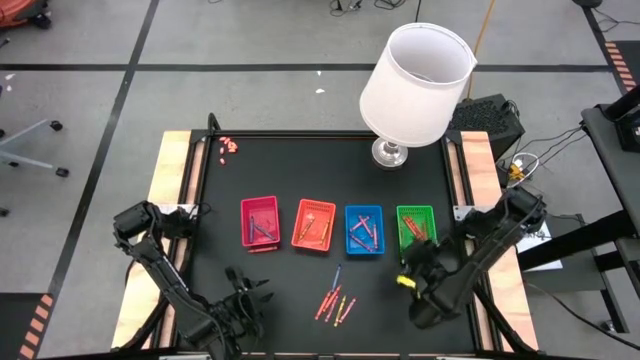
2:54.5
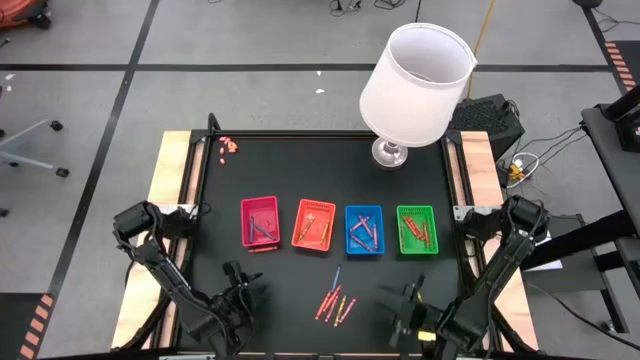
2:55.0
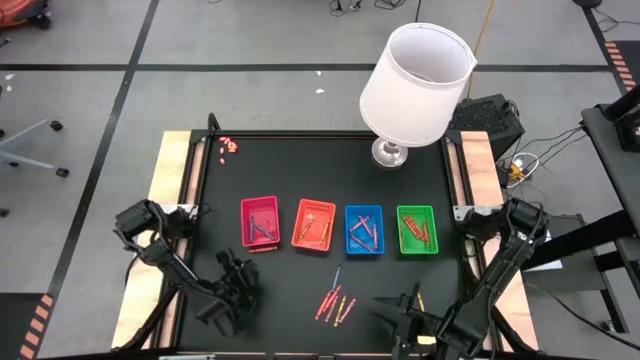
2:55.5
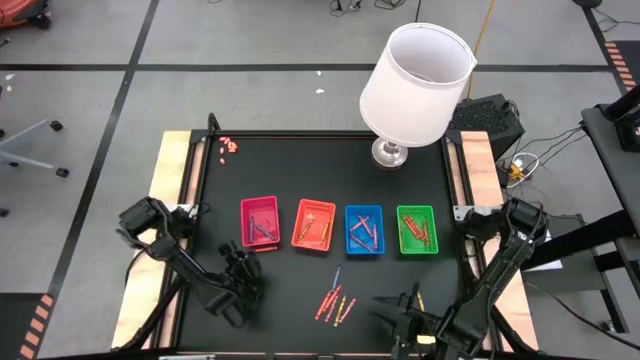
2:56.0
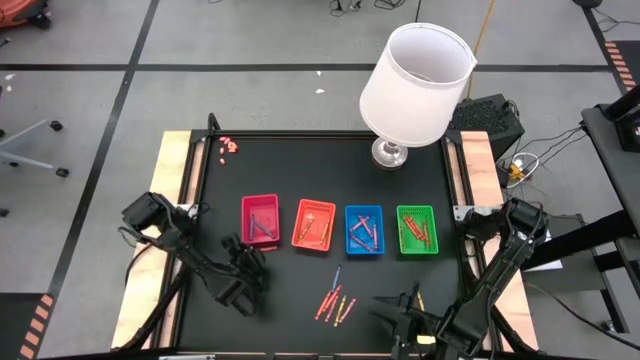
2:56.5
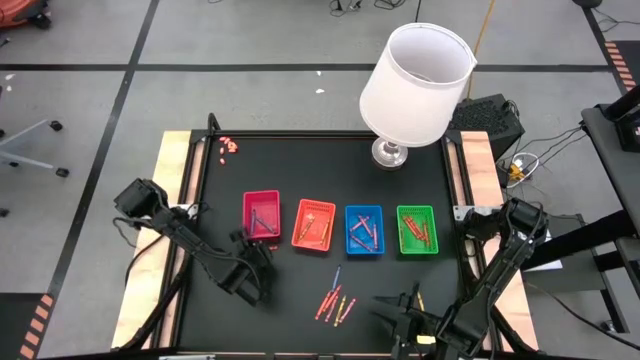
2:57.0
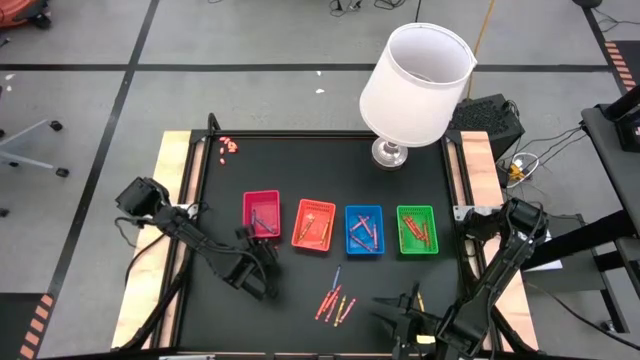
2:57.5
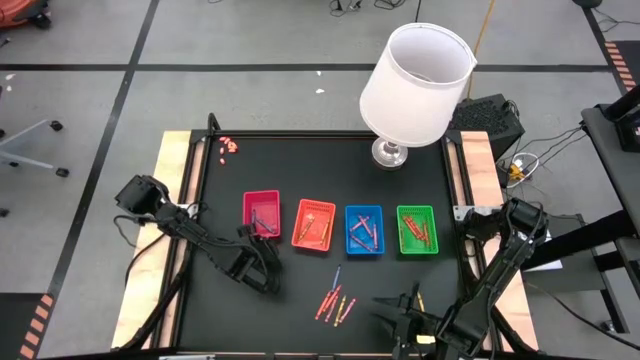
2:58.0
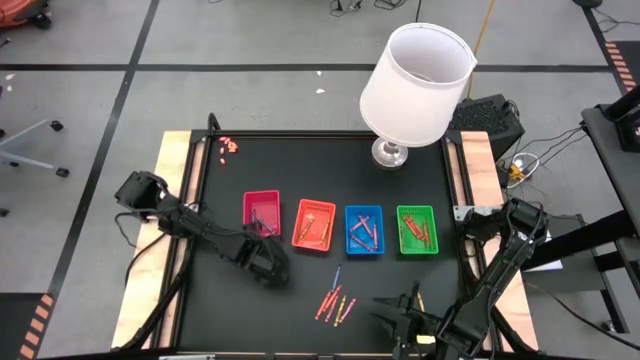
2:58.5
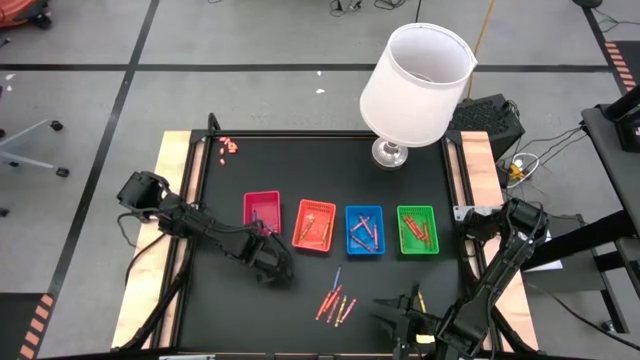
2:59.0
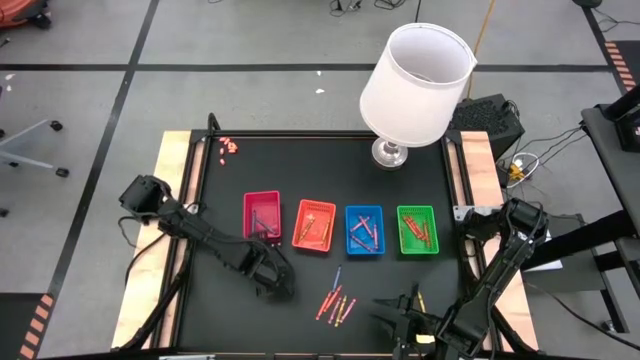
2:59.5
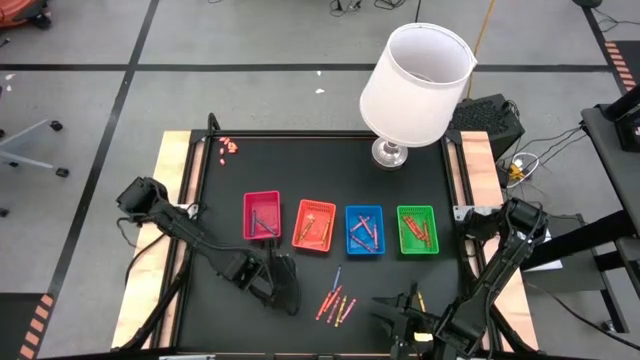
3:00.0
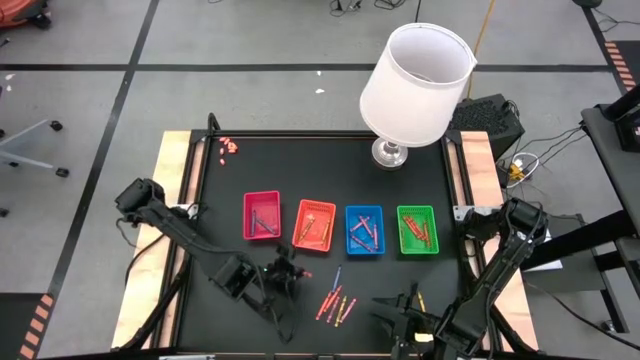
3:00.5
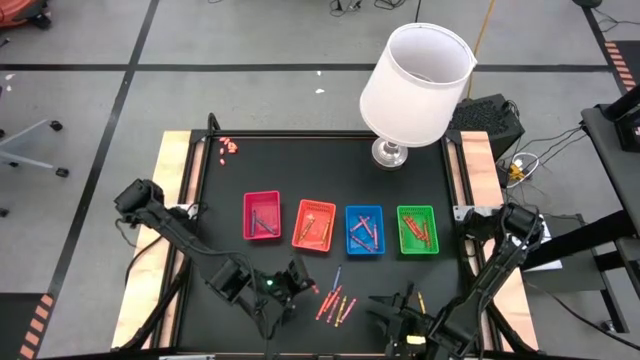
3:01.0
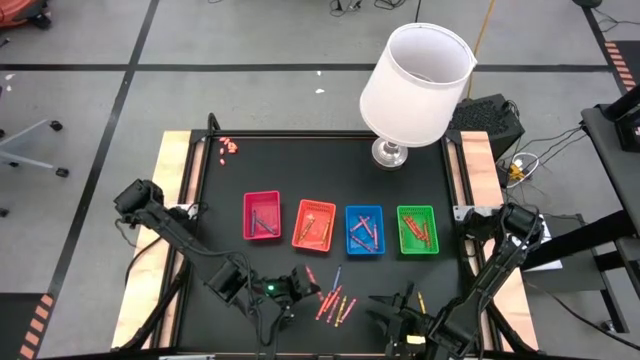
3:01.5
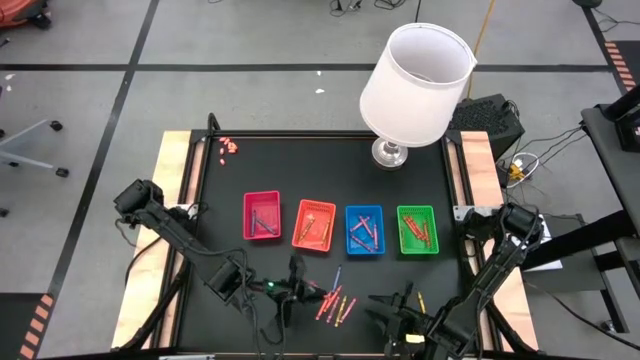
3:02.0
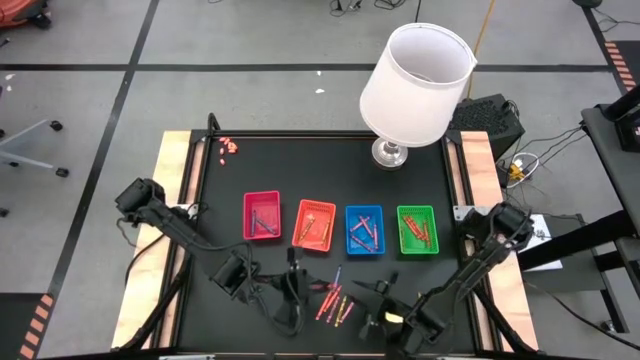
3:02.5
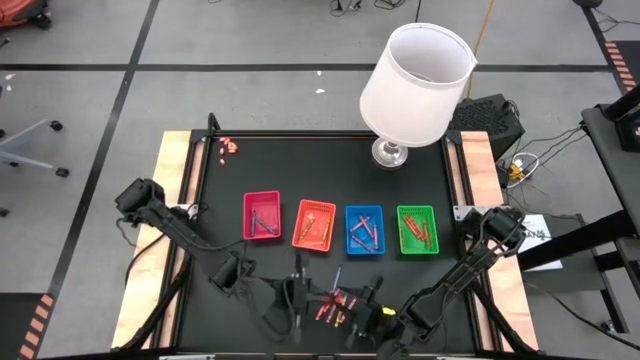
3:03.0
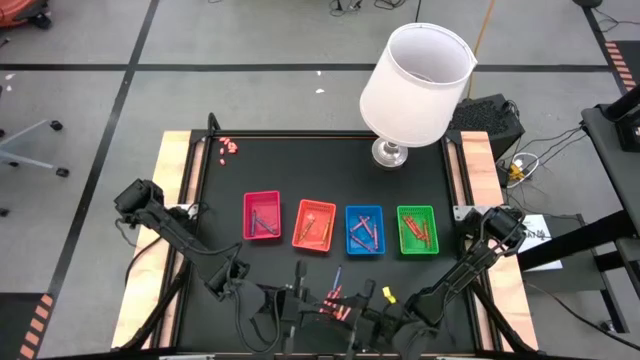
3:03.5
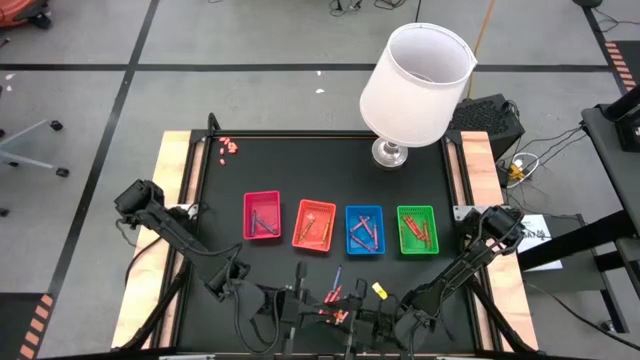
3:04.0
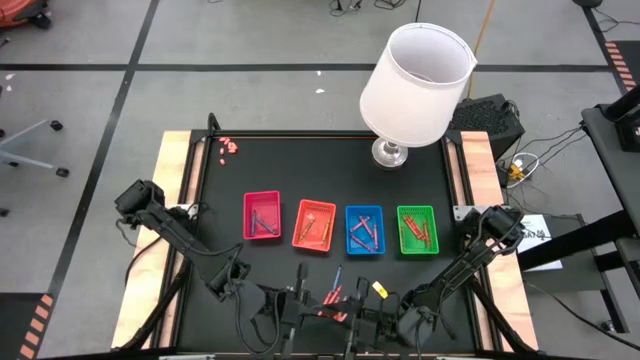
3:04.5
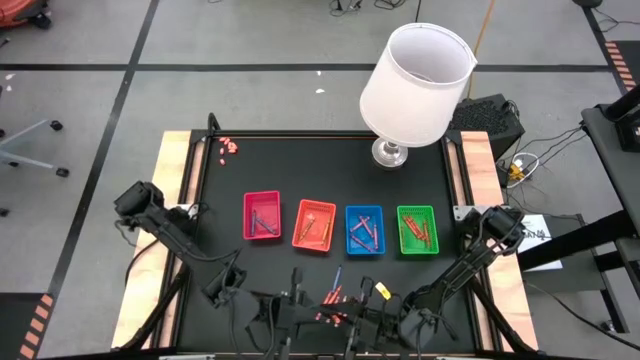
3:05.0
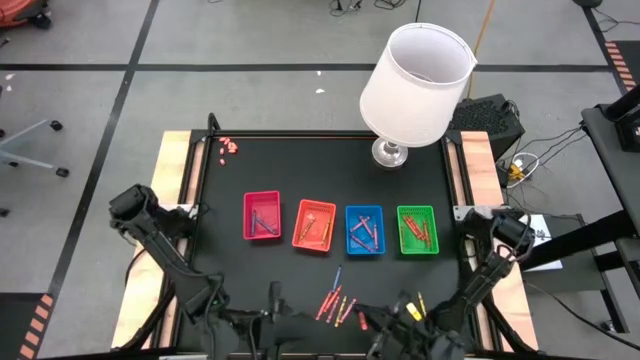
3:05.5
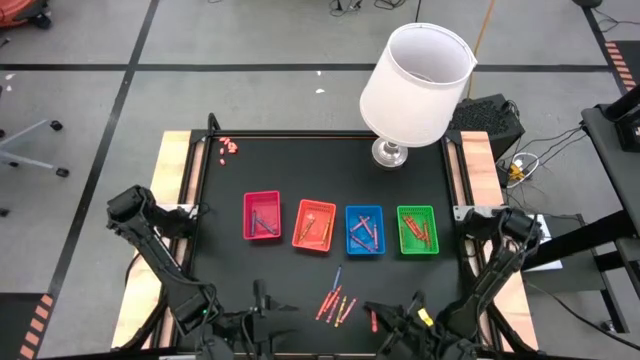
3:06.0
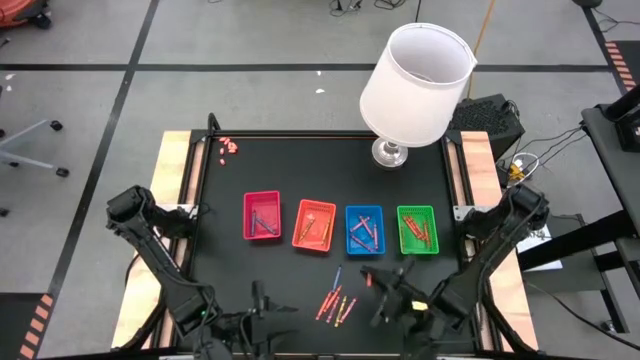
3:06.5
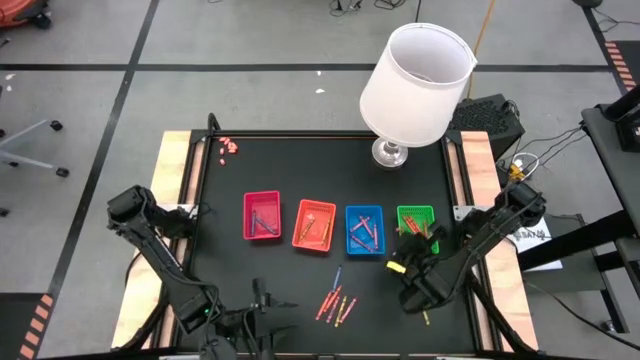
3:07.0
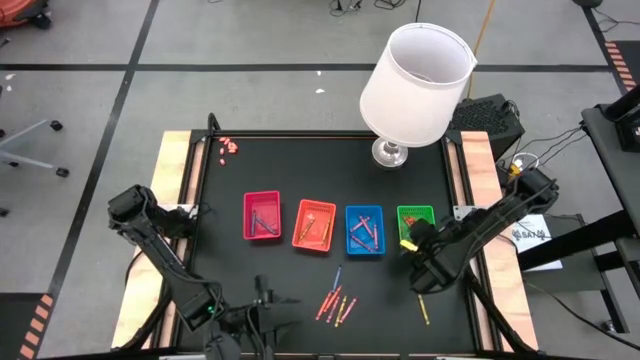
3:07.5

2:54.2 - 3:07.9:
Task: Sort crayons
Put the orange crayon into the green bin

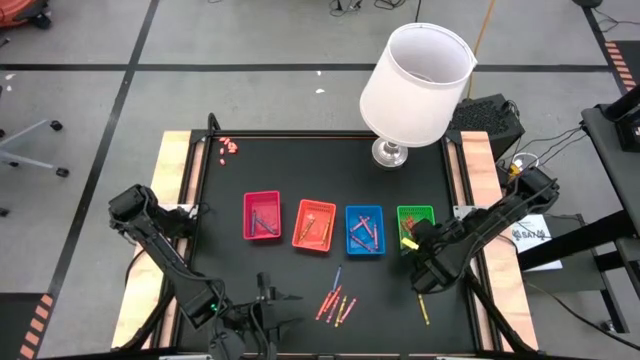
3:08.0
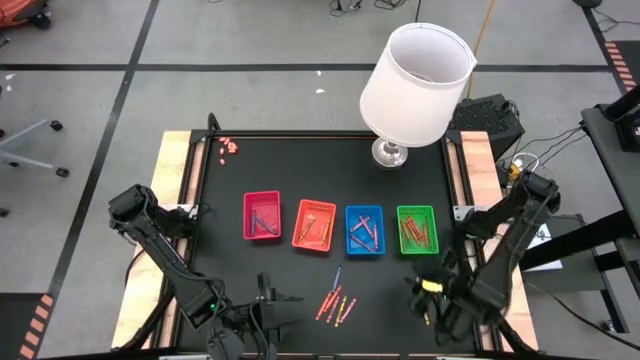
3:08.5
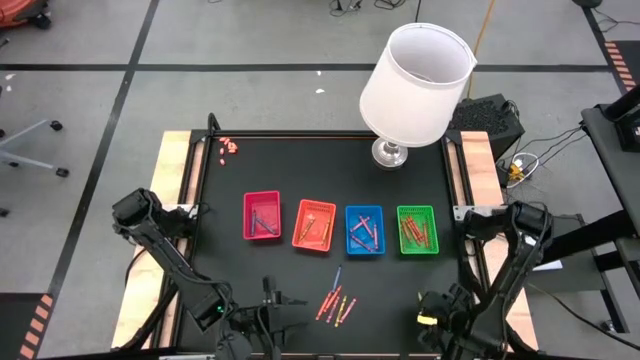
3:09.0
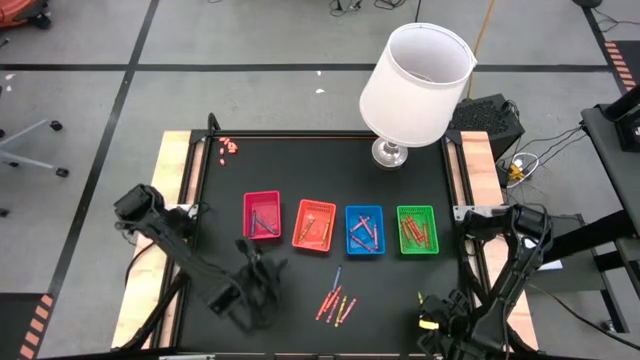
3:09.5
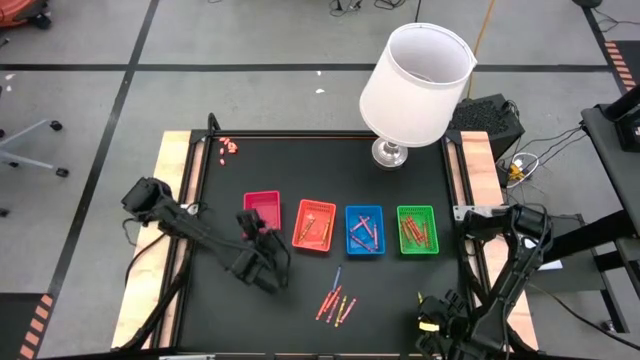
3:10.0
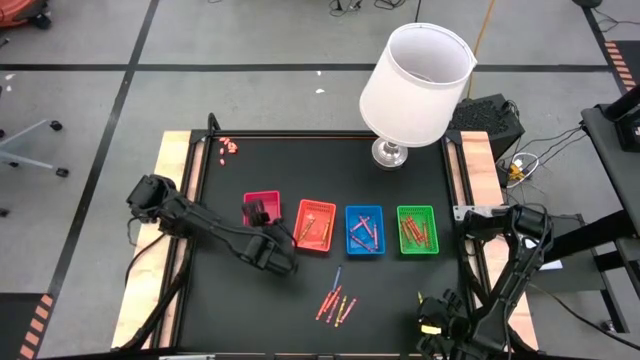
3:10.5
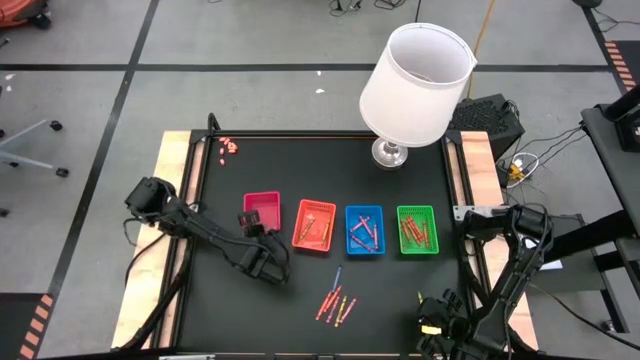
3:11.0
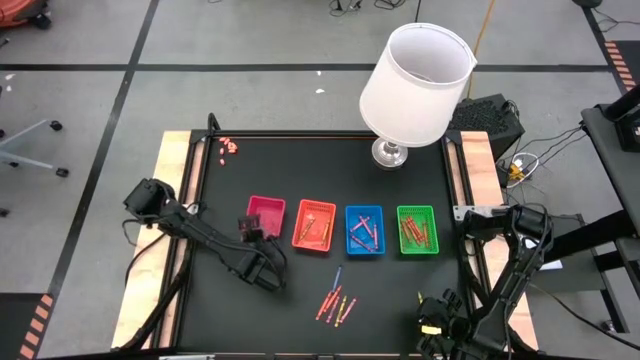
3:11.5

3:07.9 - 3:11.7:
Adjust the red bin

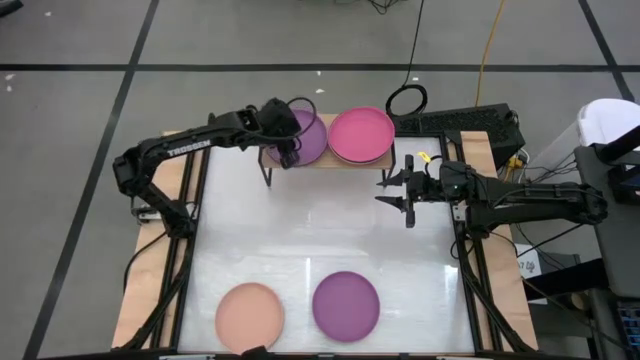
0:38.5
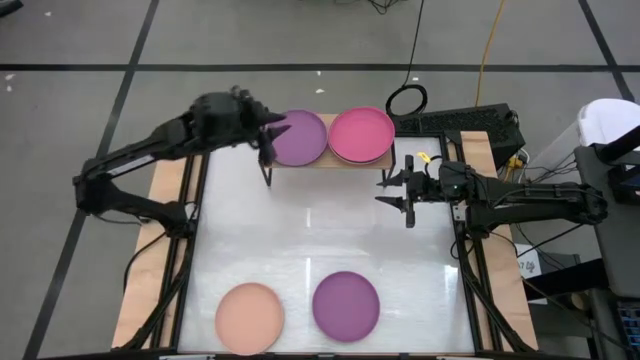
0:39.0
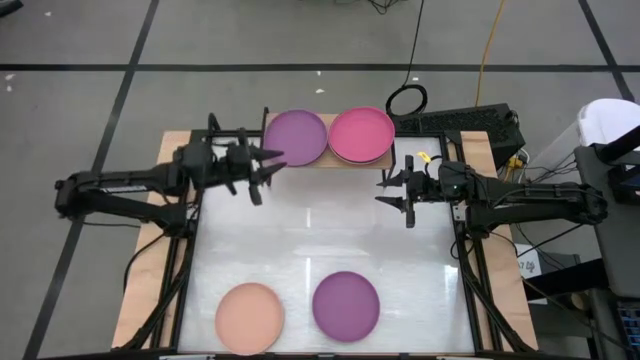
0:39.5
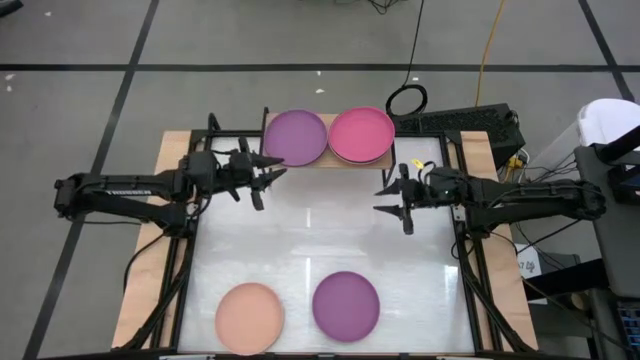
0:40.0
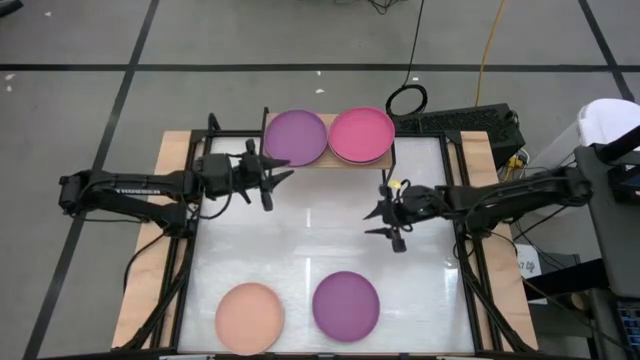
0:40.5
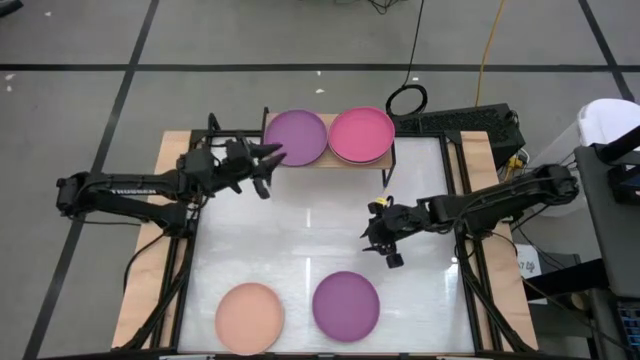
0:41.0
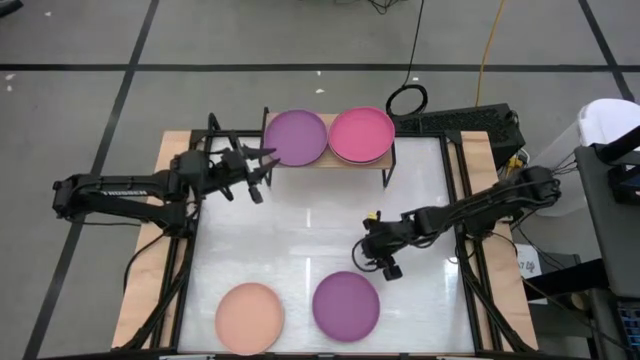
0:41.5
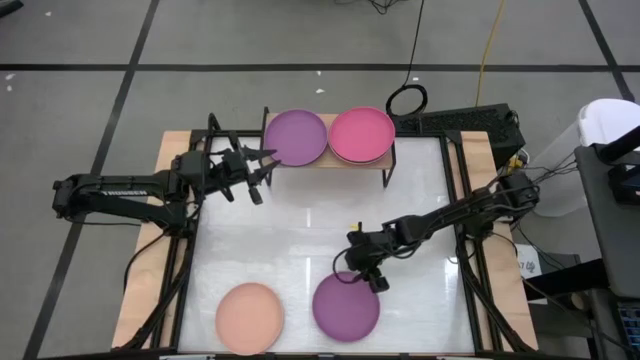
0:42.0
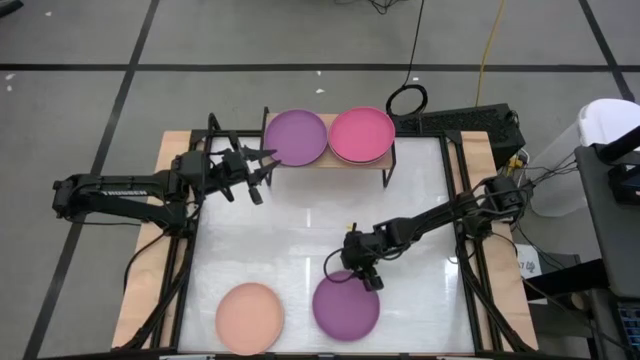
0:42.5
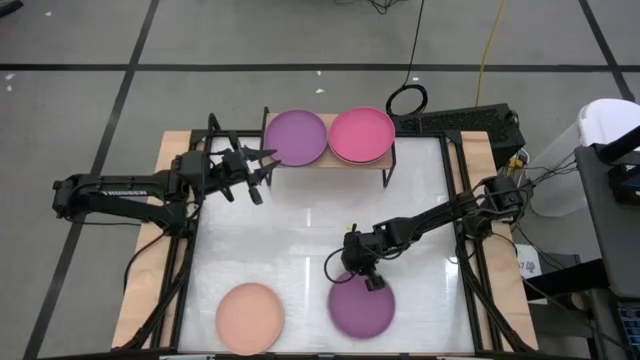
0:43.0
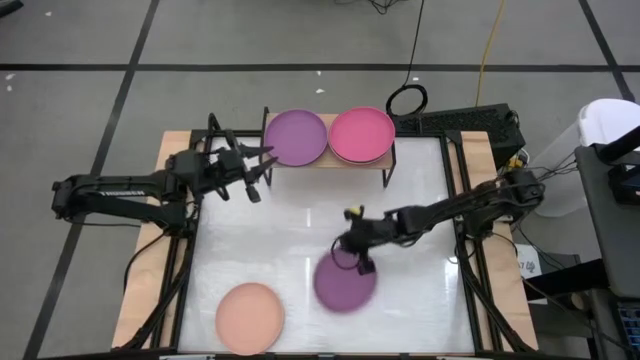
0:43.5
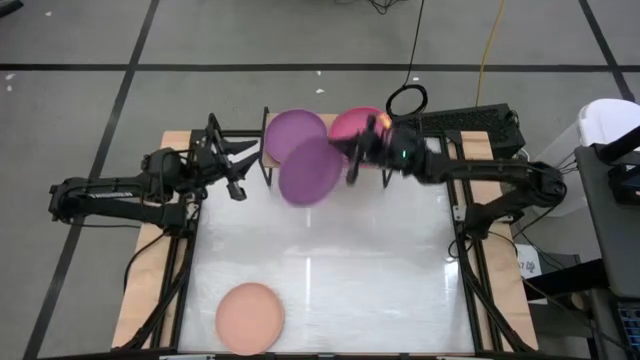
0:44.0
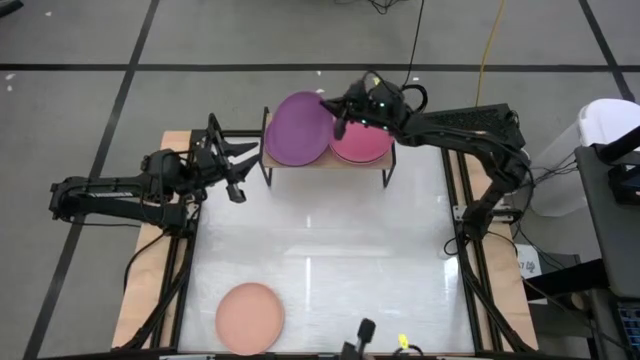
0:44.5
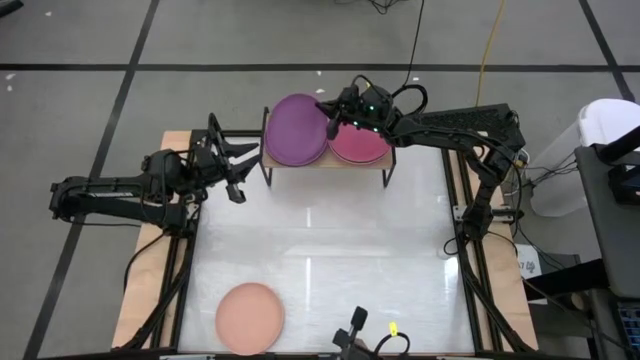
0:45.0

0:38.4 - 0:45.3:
Task: Place and stack plates onto a shelf
Stack the purple plate on top of the purple plate on the shelf
